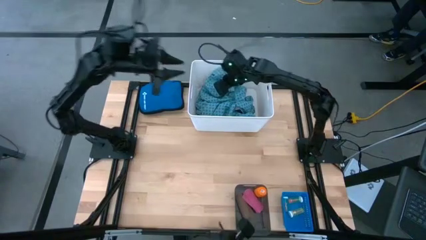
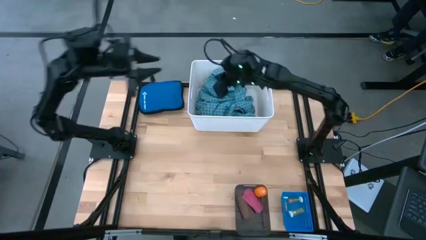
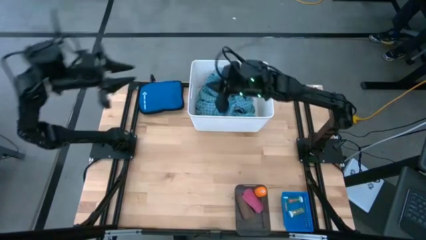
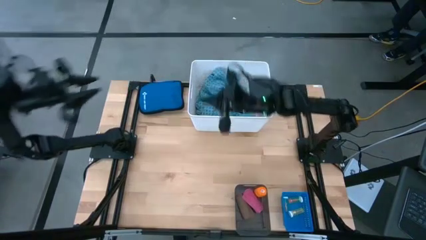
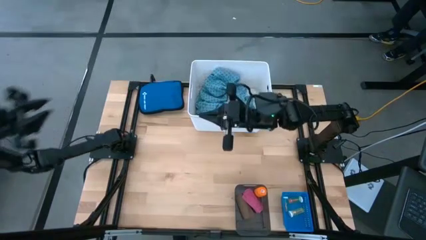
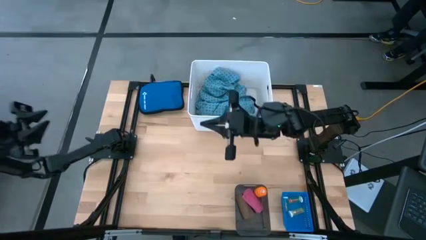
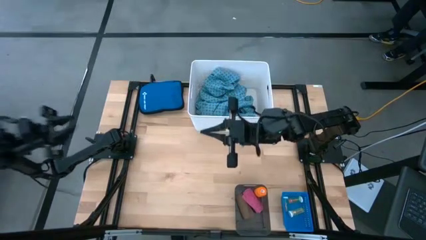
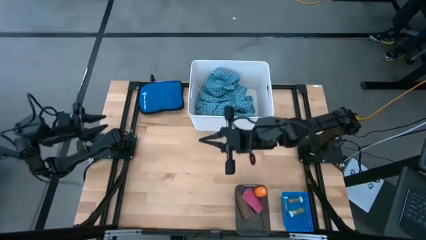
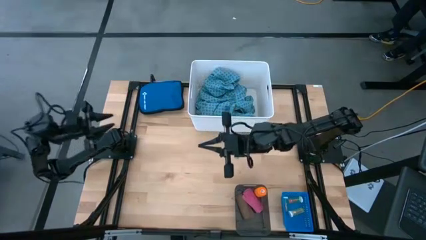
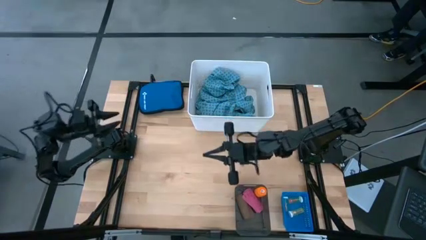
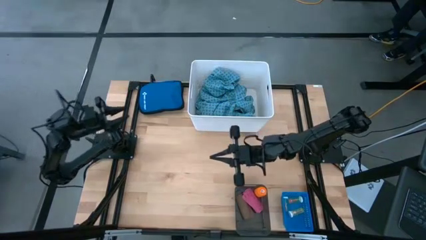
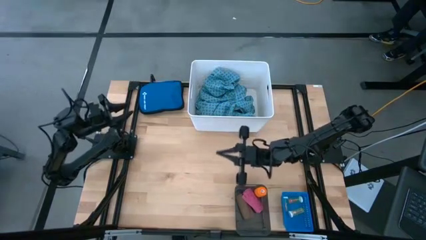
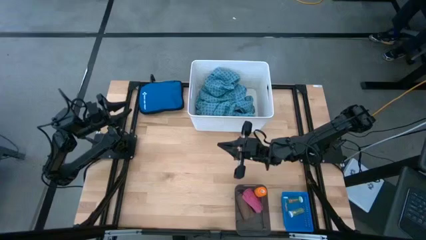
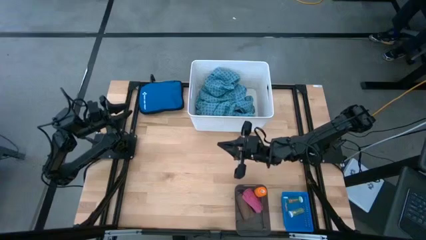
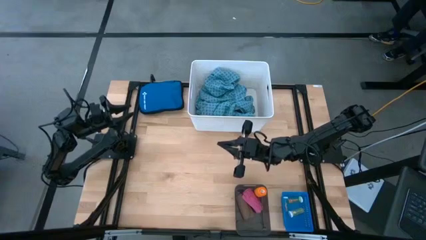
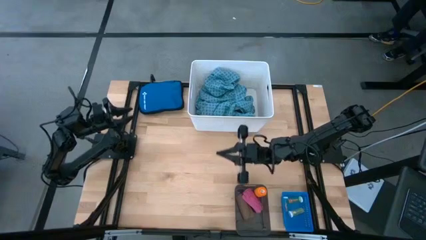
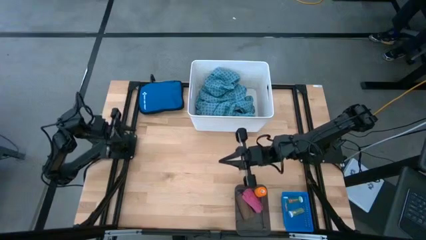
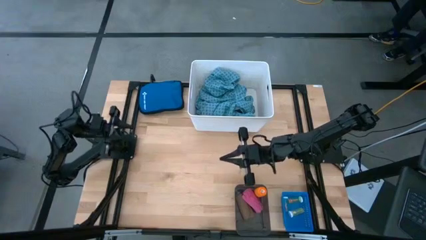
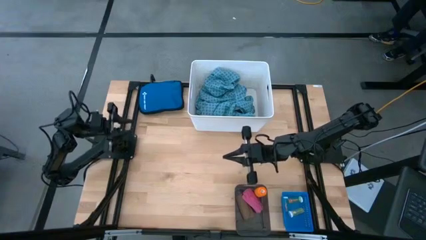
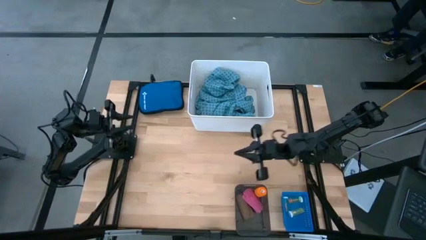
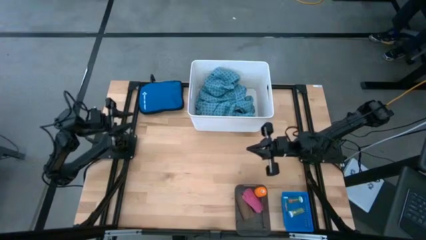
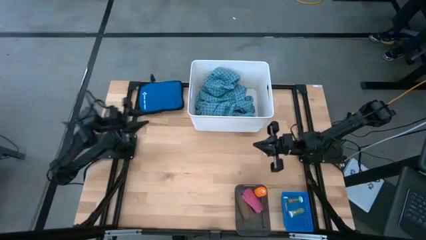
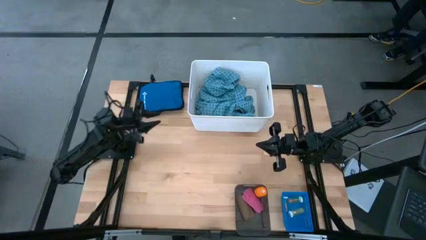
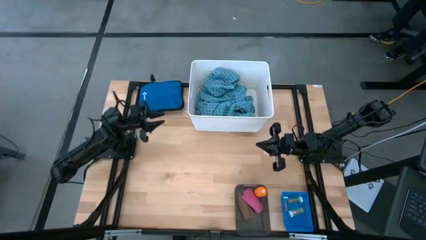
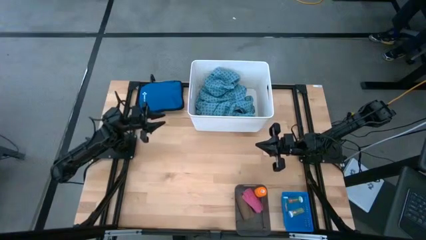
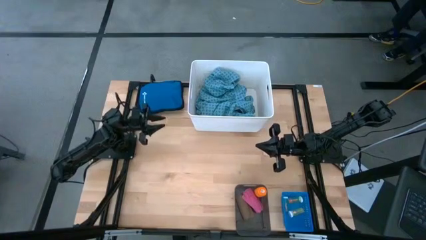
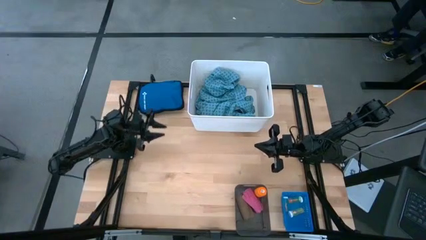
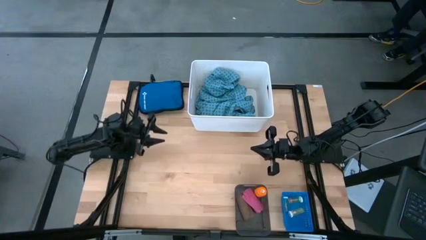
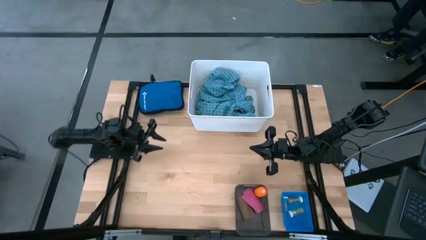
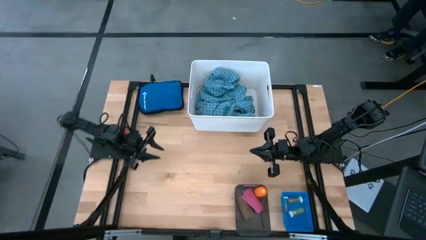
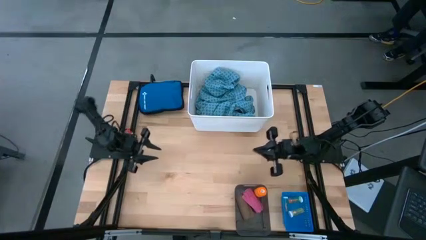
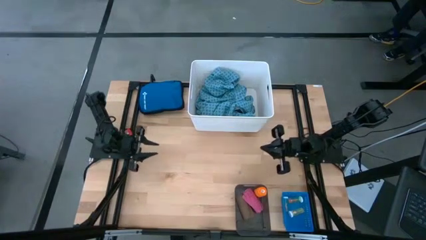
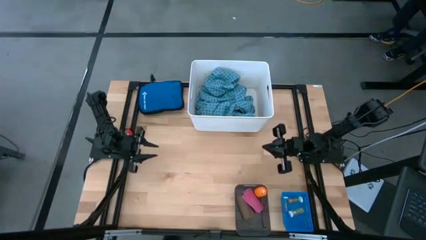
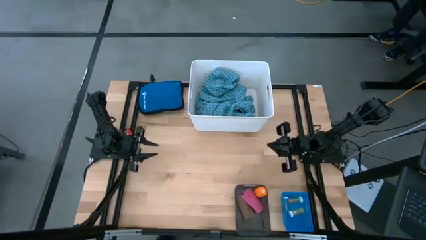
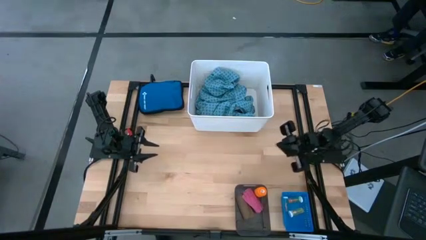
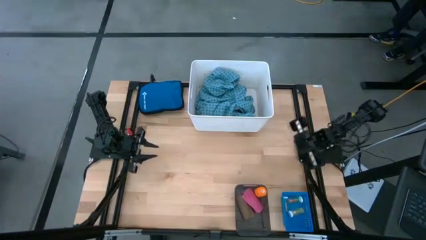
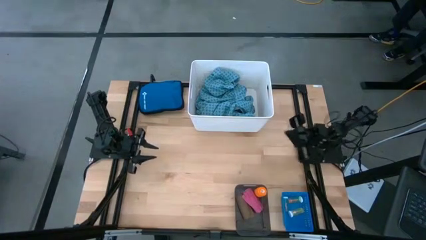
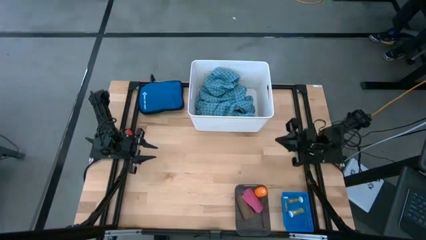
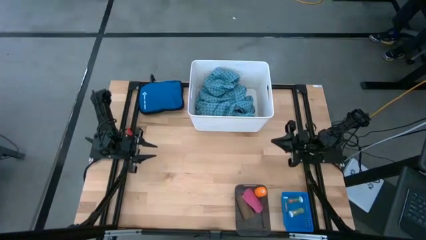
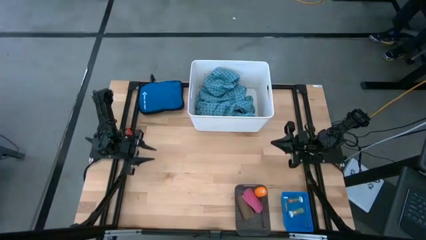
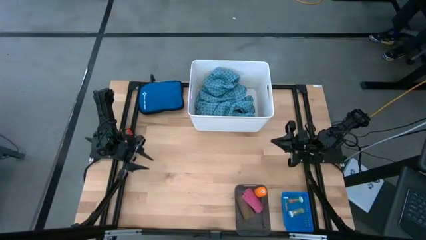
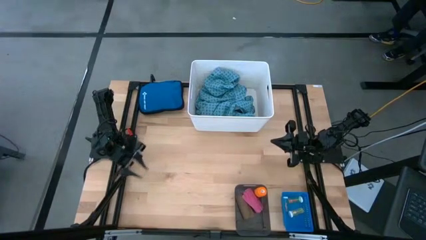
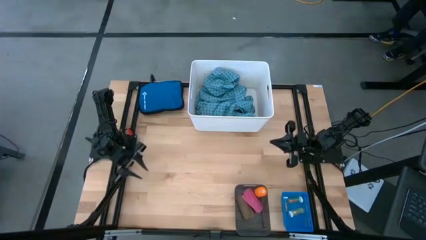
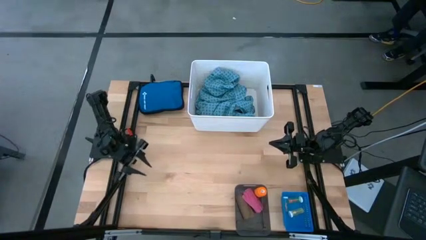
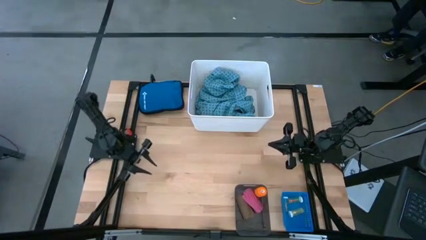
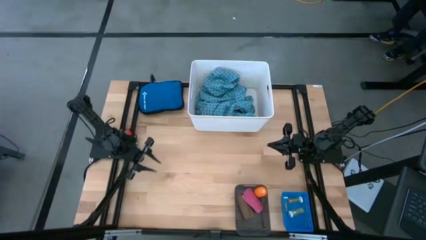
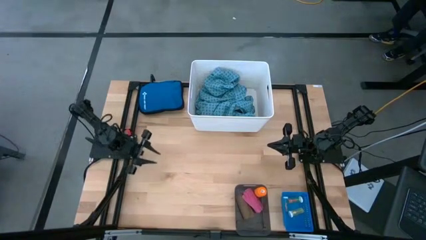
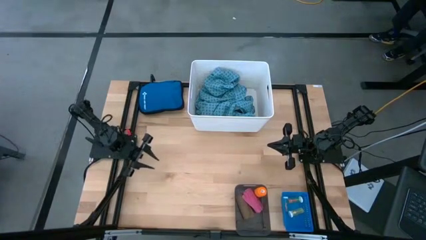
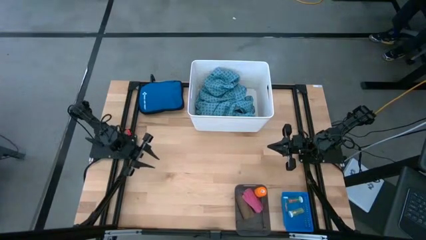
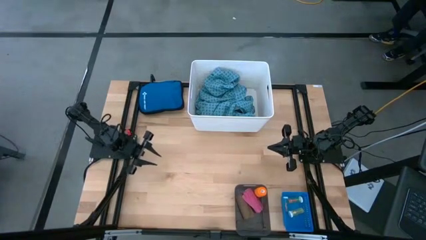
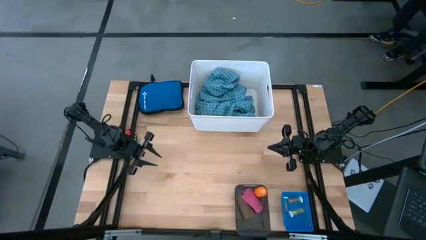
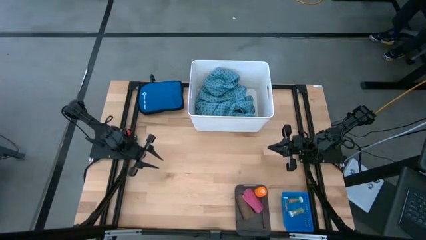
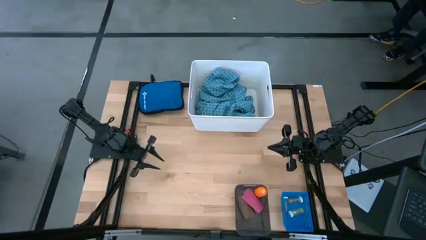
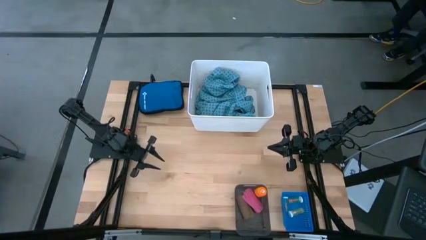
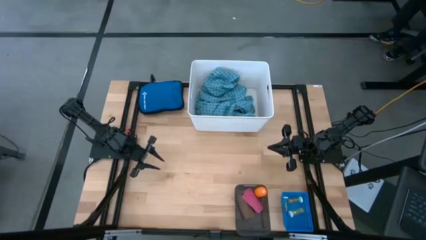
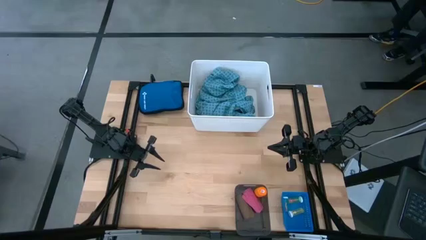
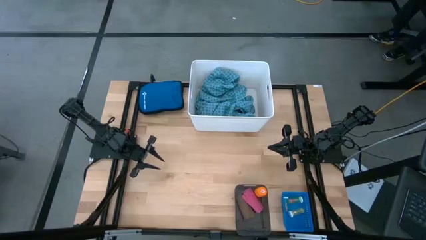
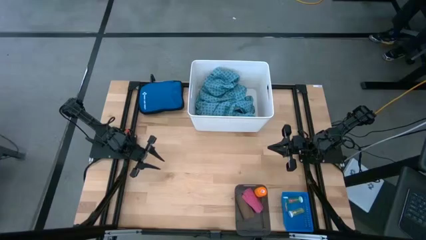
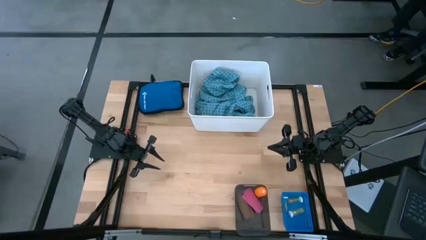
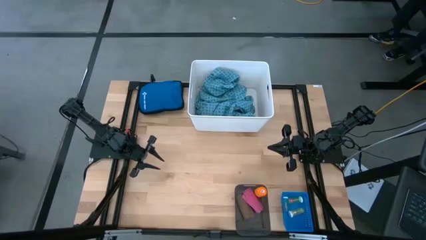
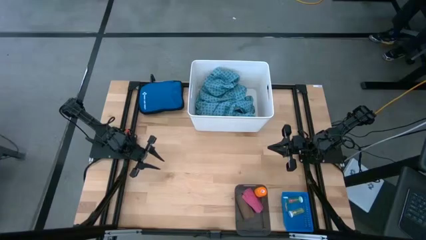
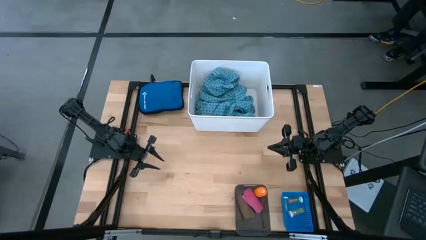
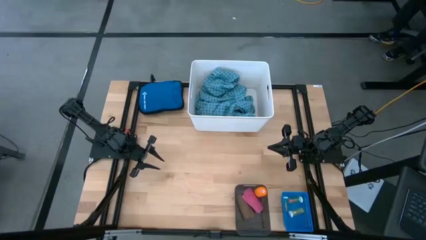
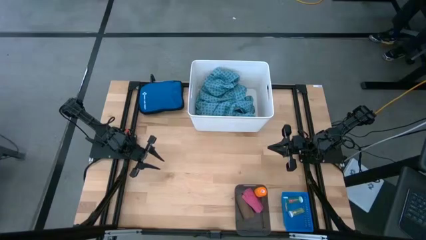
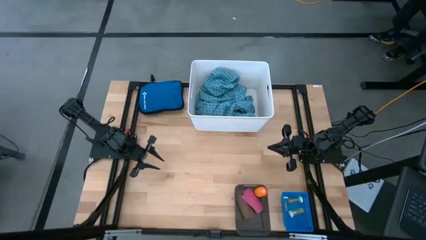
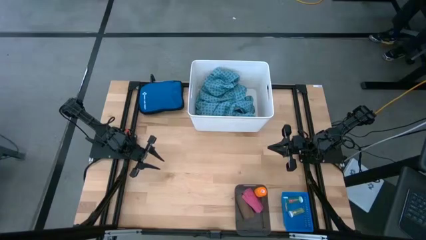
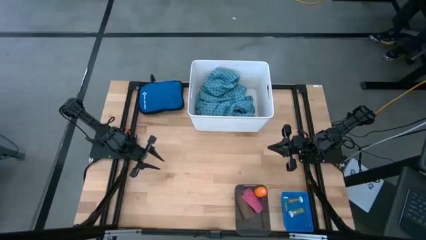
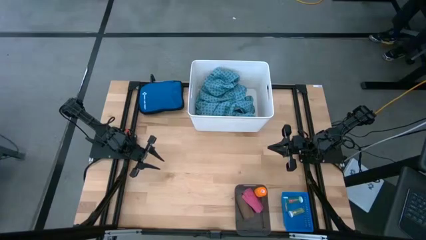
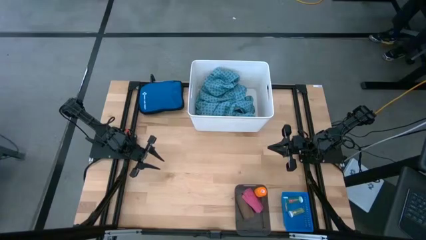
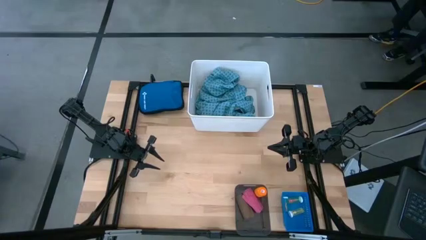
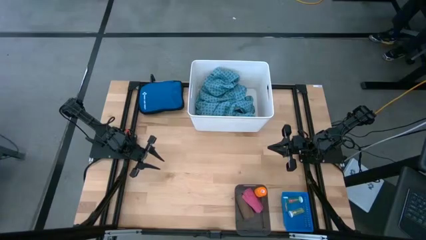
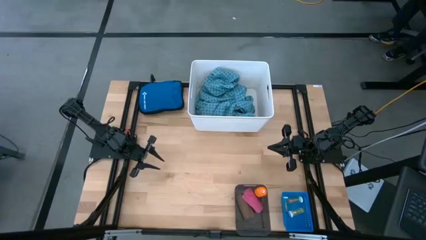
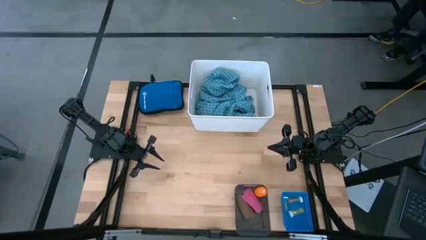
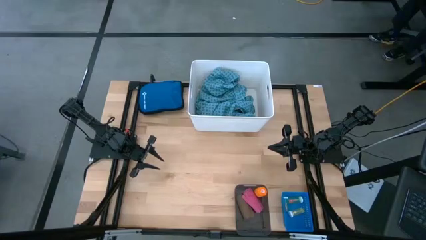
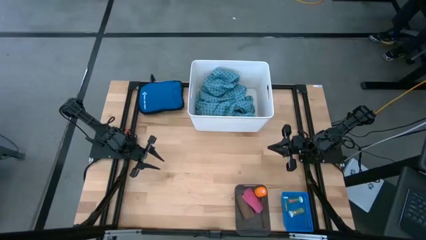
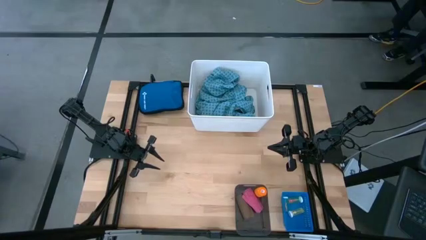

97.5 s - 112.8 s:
Task: Pick & place medical supplies in basket/bin
Return to Home Position

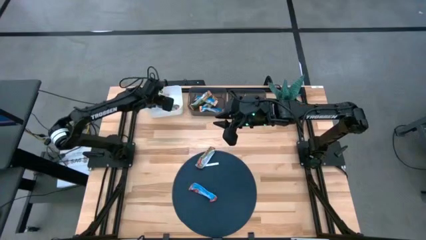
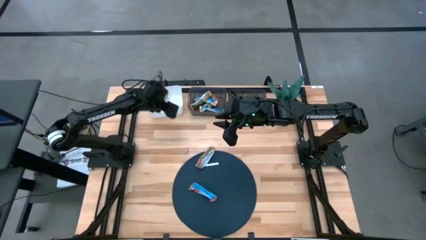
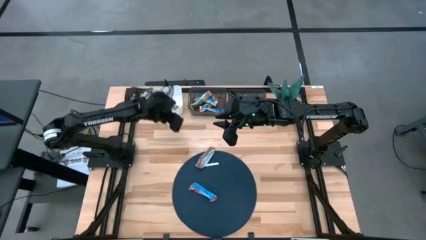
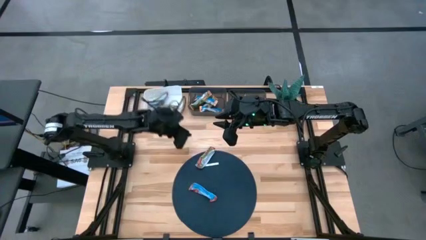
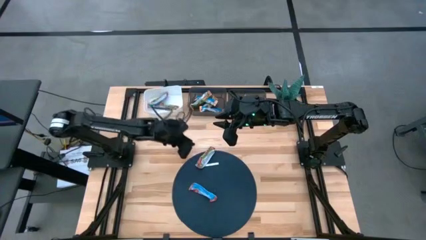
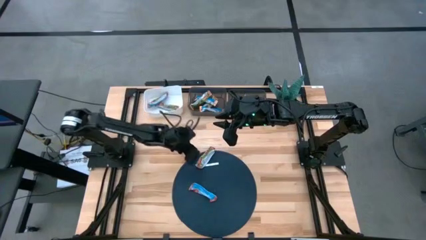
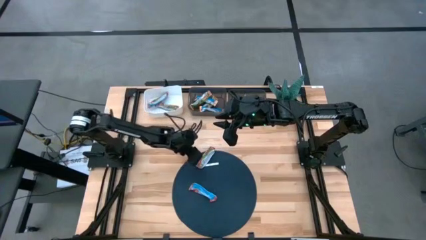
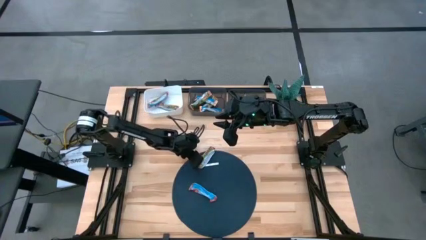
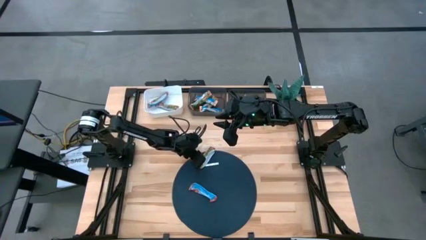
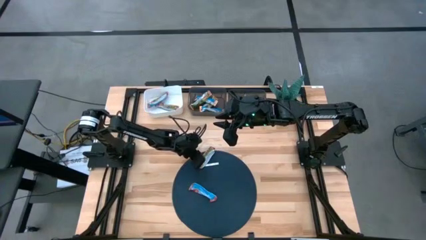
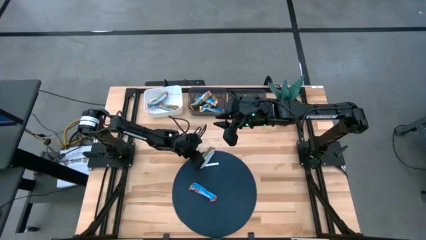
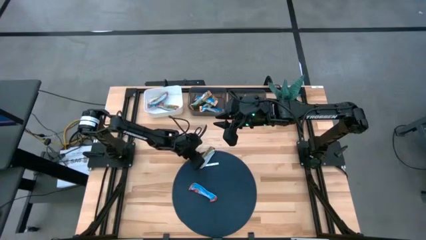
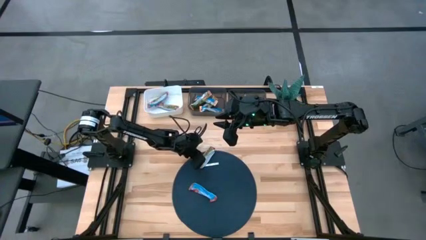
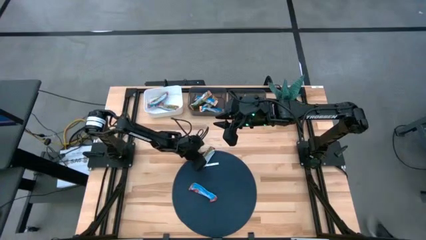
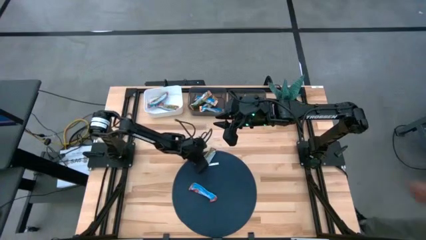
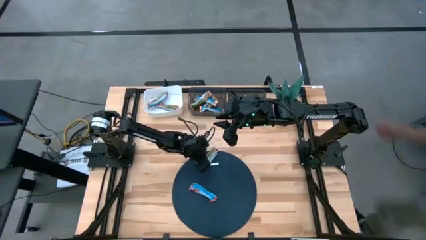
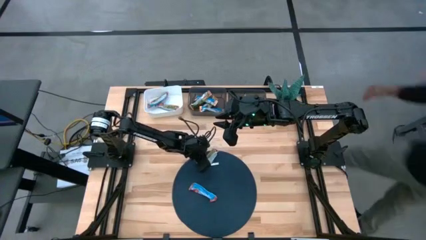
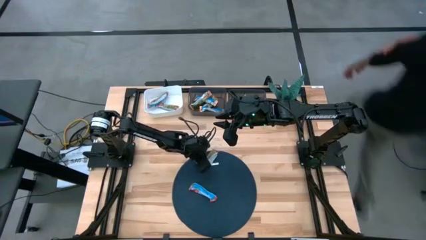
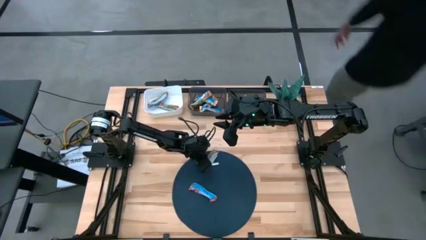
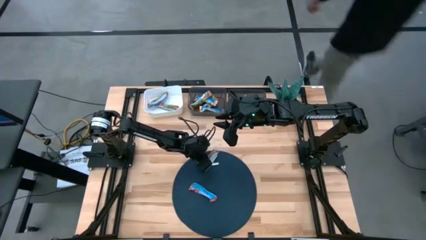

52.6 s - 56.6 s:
Task: Pick and place Granola Bars by type
Put the red granola bar into the white bin
